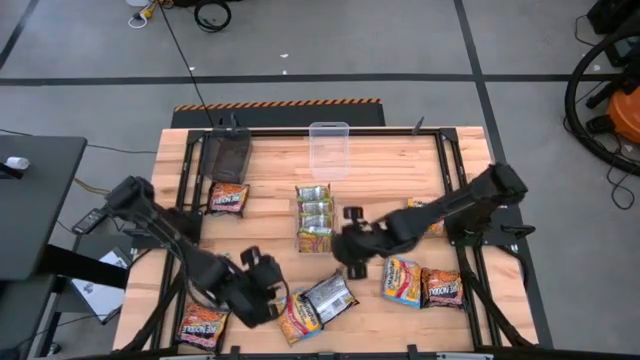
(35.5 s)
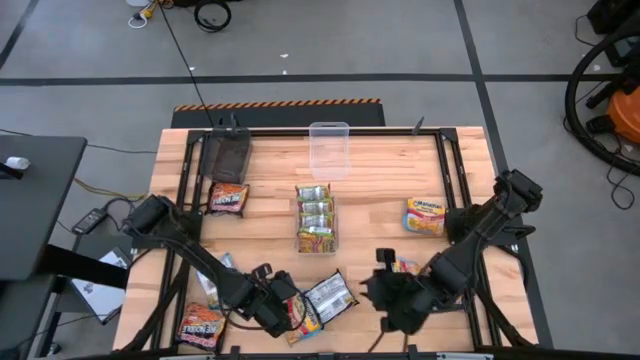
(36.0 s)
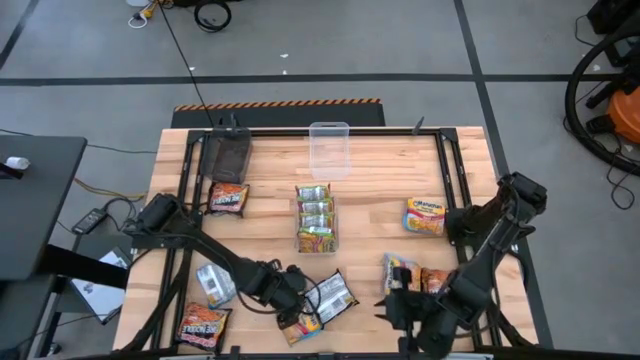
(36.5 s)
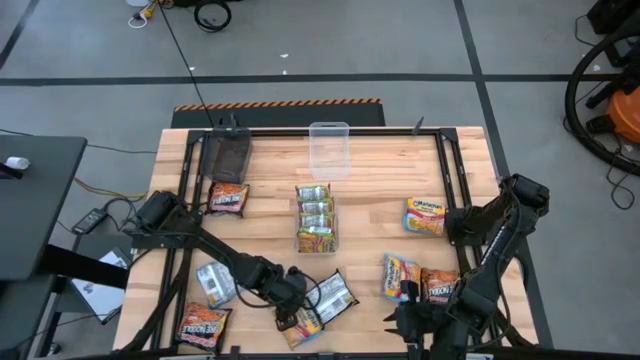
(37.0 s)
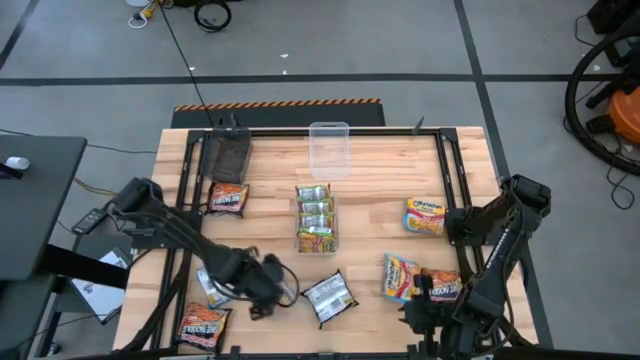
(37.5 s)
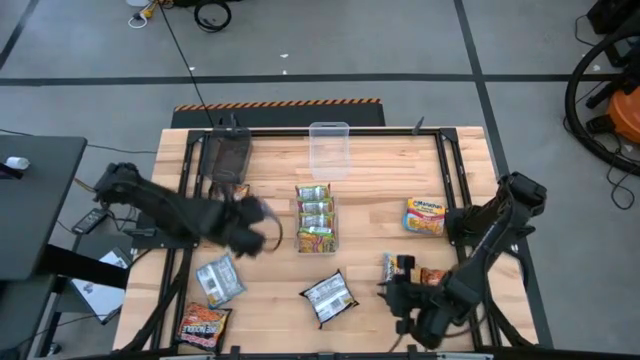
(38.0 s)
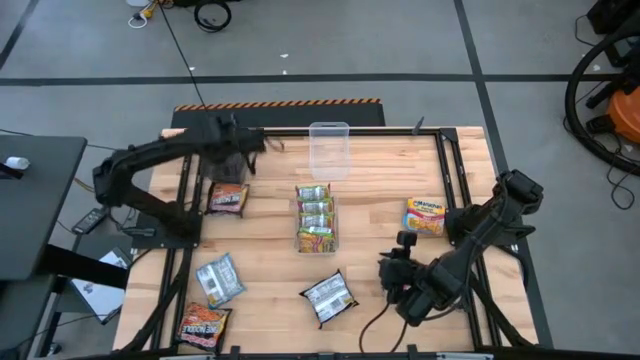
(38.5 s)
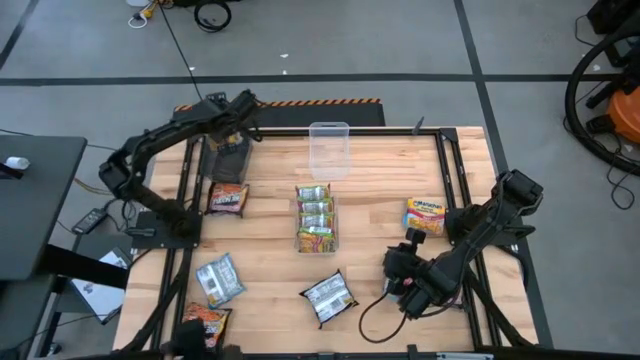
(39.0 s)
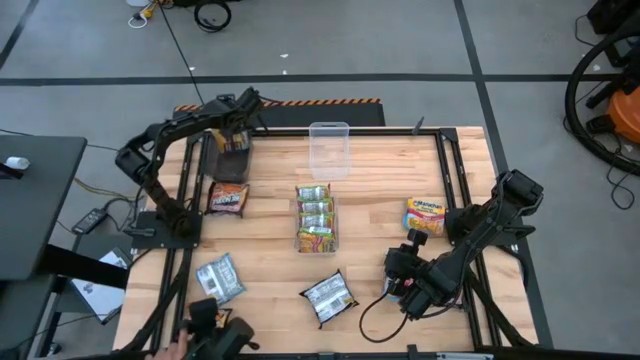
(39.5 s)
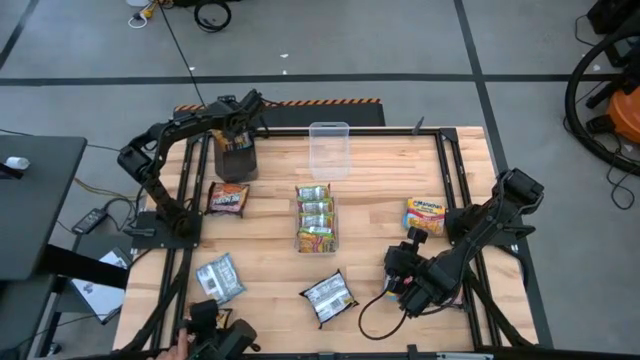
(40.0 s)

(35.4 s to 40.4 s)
Task: Sort Maruchan noodles
Put the blue noodle pack into the black bin

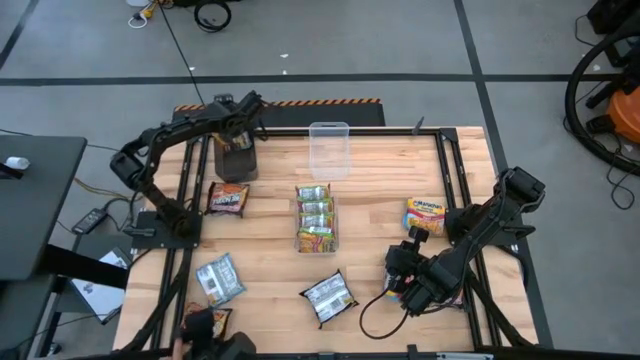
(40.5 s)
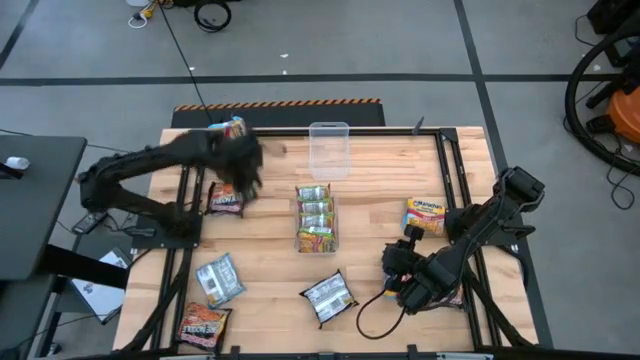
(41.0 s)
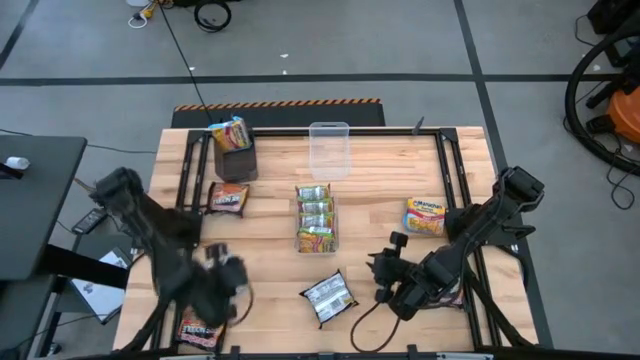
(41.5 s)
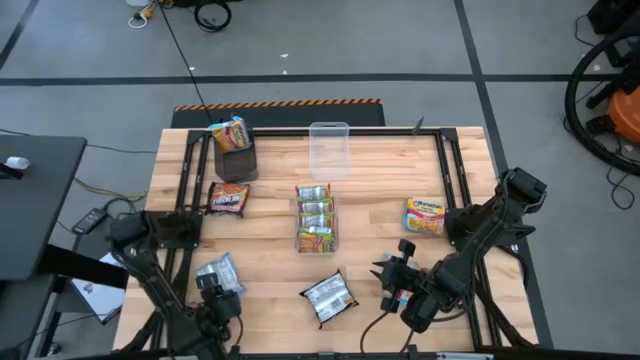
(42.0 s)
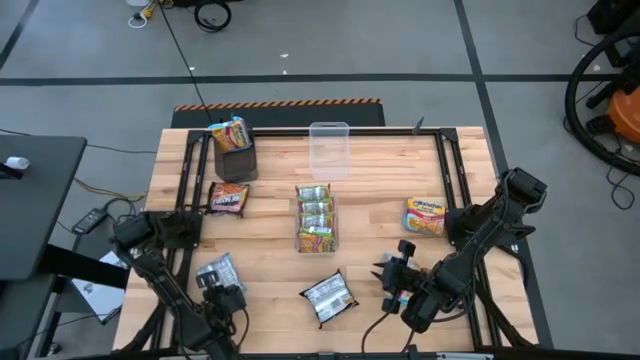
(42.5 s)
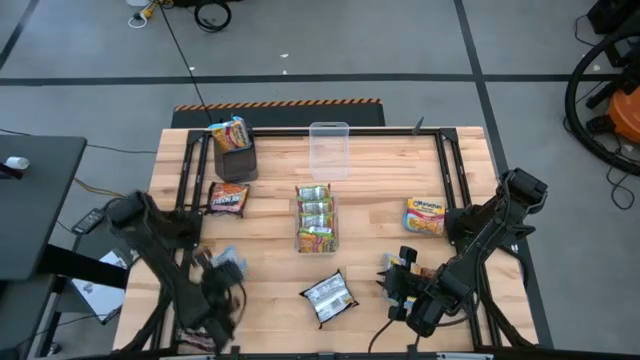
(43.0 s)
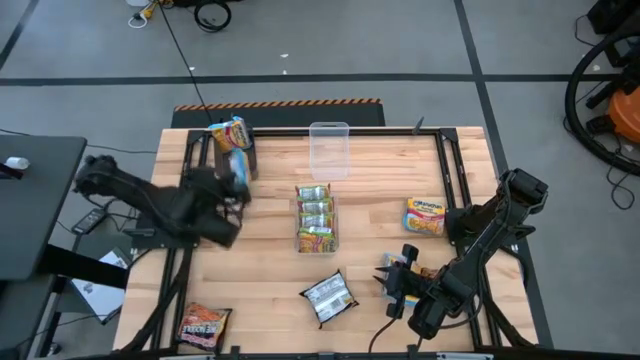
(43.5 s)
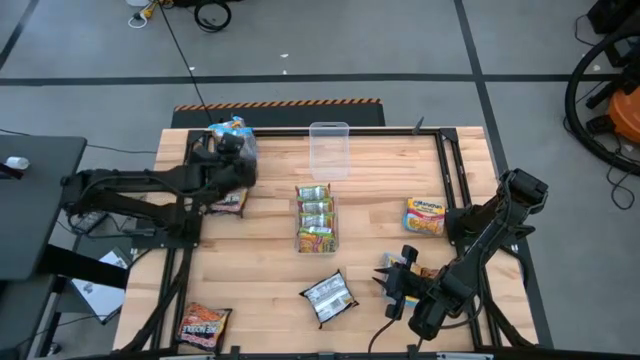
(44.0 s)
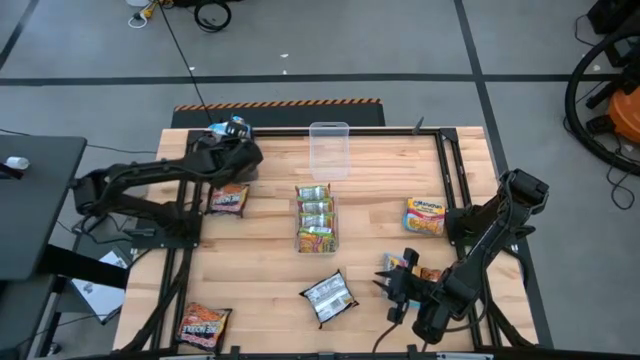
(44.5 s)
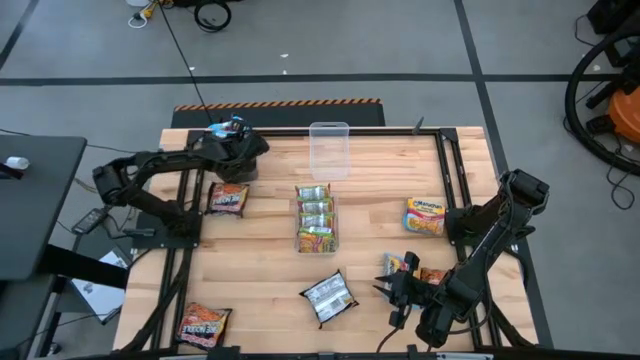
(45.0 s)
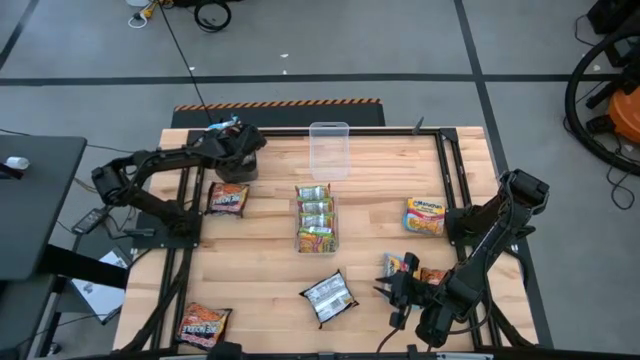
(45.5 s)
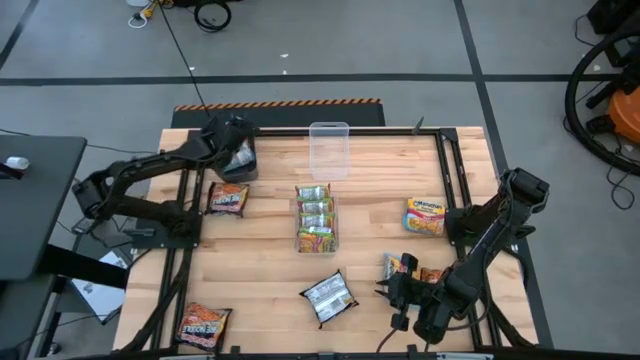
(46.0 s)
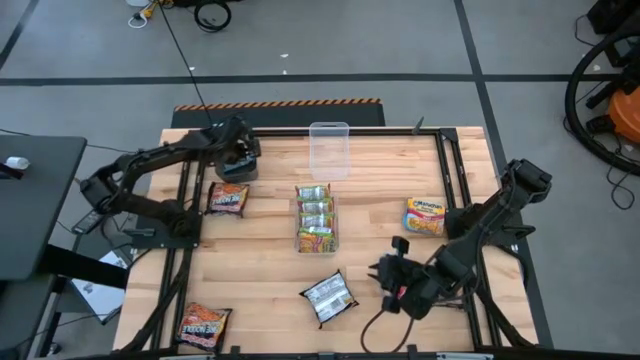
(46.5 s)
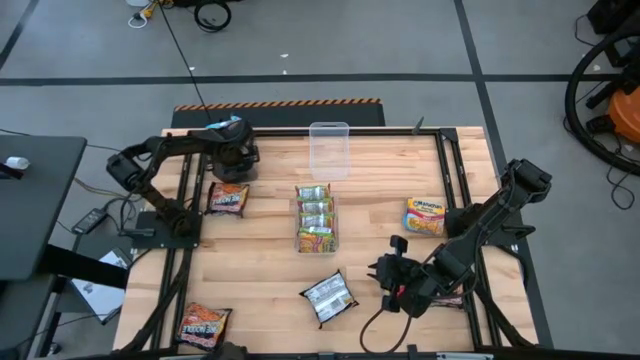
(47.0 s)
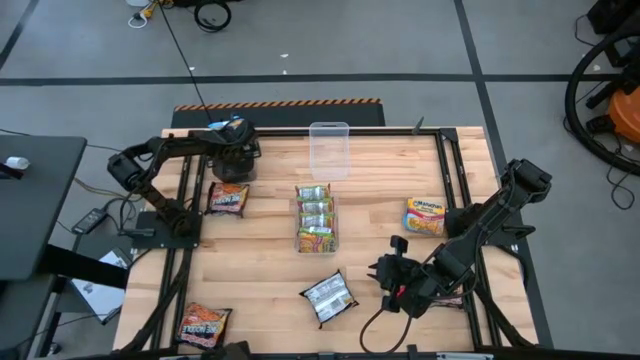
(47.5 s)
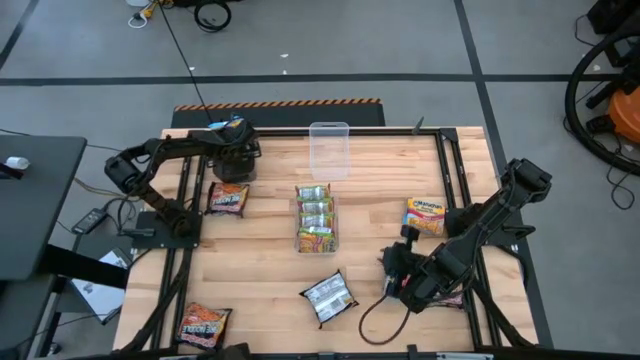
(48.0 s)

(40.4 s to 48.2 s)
Put the blue noodle pack into the black bin

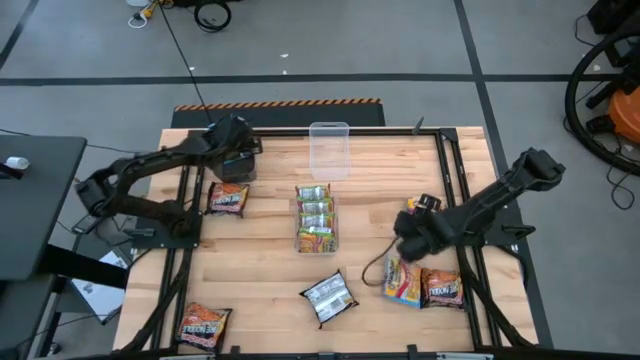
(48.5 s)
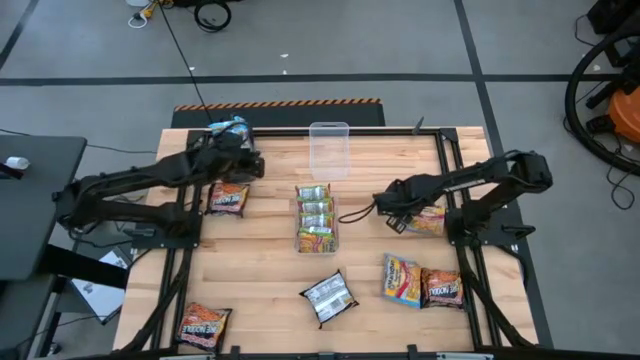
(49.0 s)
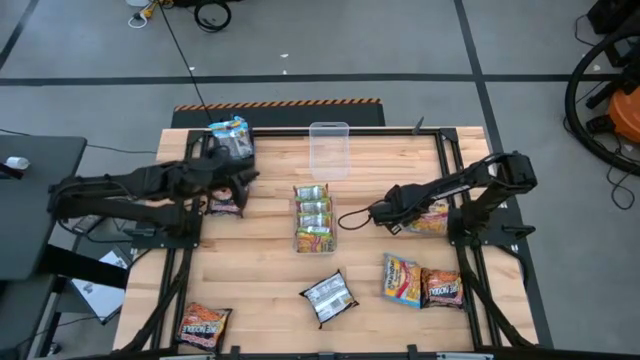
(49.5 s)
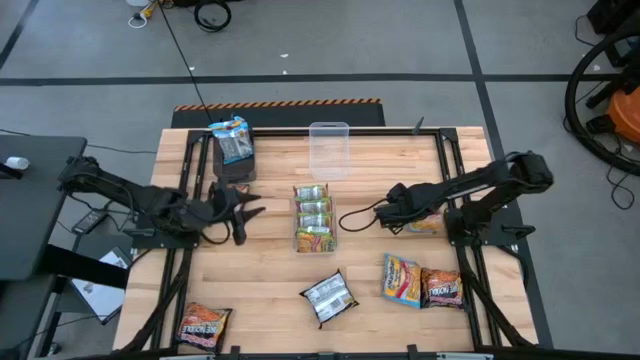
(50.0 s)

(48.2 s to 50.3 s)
Put the blue noodle pack into the black bin

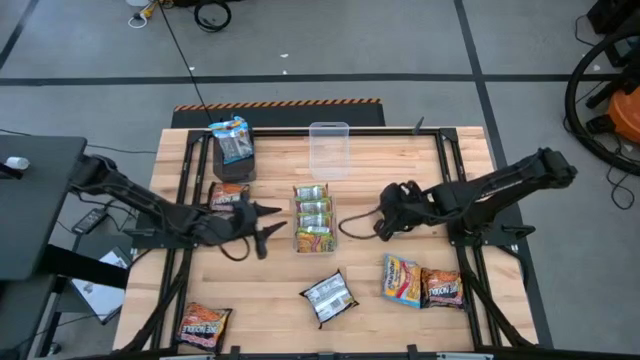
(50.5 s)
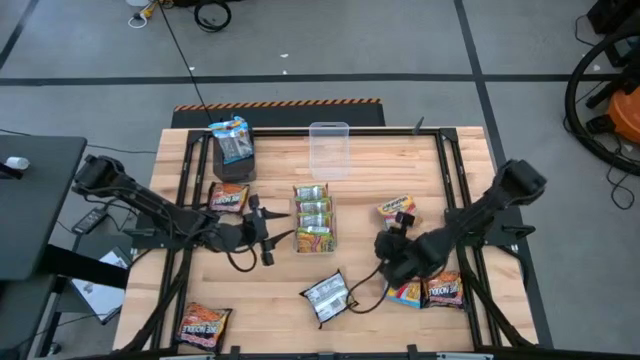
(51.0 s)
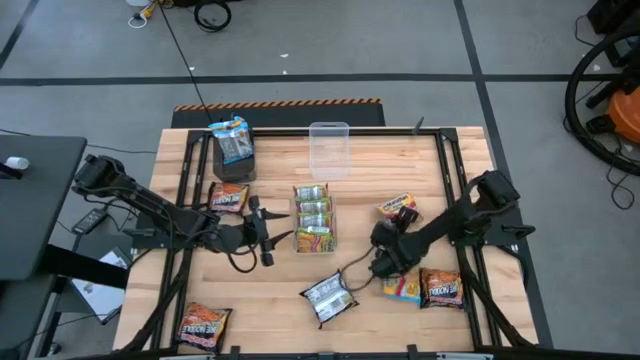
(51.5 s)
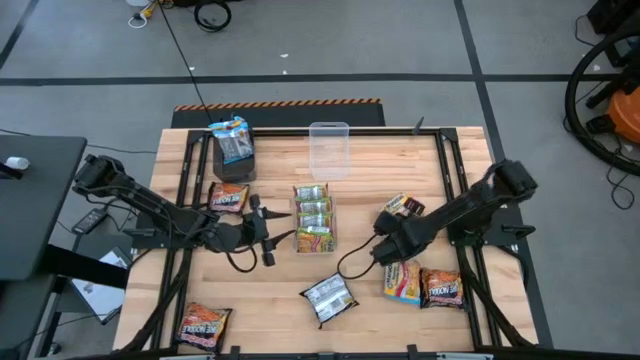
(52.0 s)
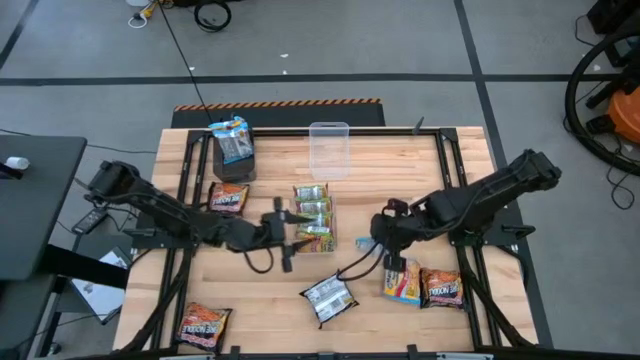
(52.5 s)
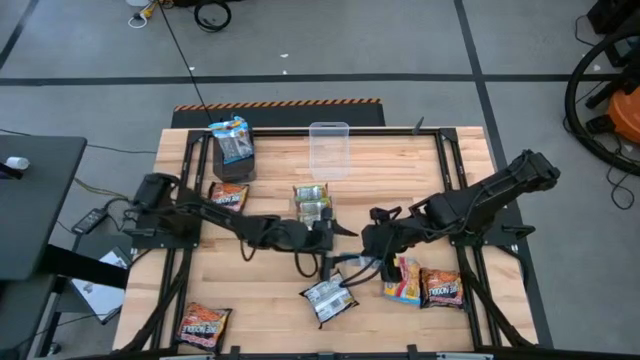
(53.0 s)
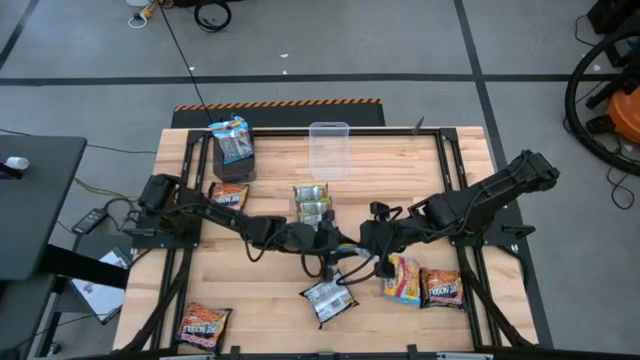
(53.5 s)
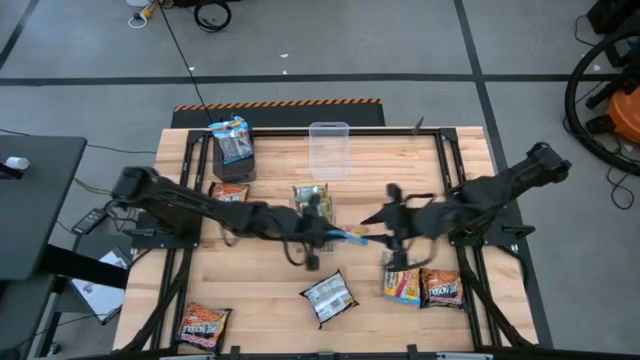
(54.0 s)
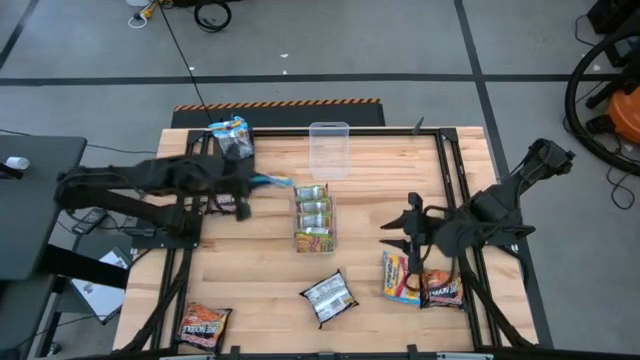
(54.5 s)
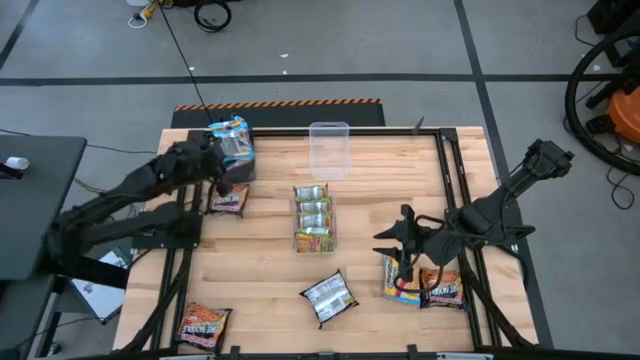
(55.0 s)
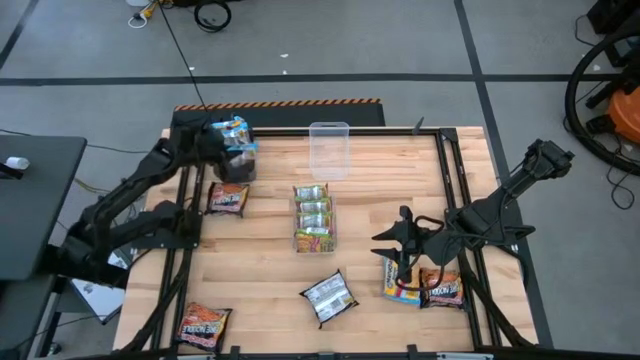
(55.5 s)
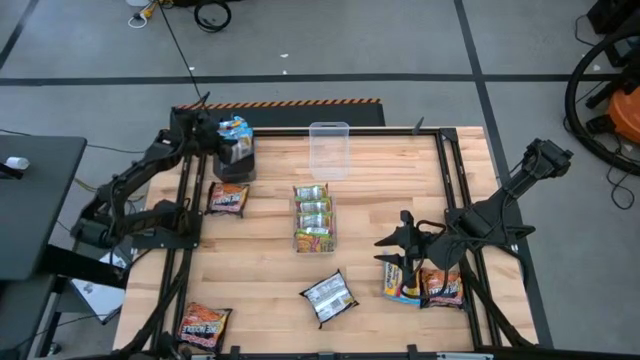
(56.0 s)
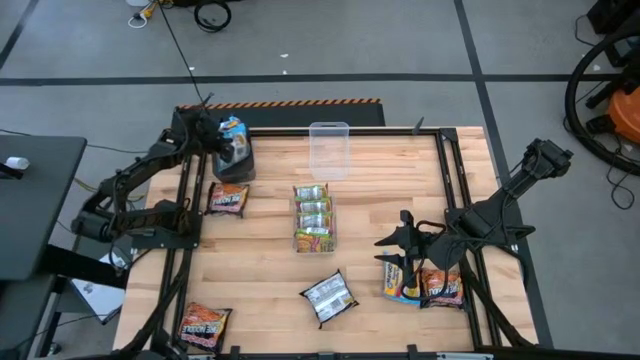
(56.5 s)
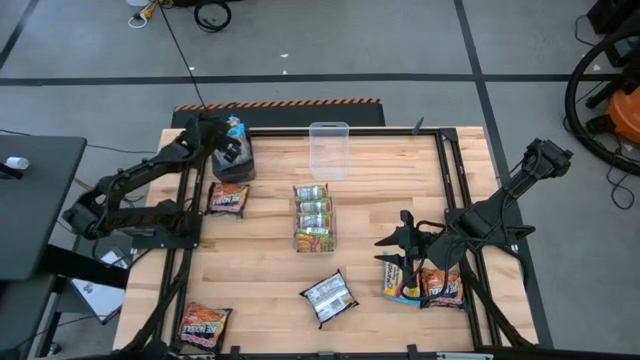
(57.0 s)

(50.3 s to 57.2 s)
Put the blue noodle pack into the black bin
